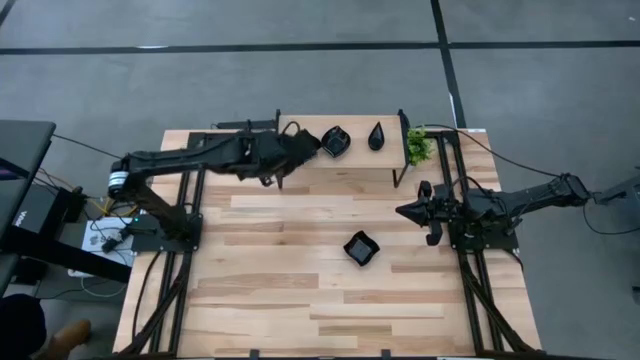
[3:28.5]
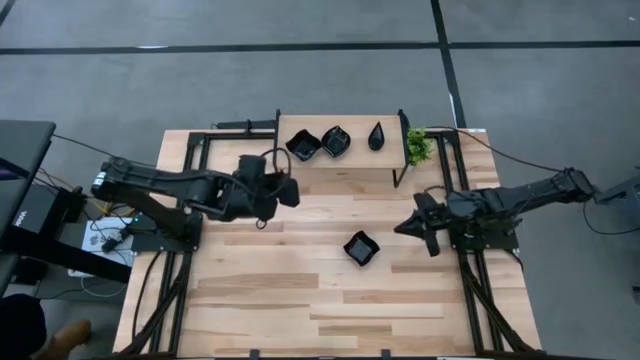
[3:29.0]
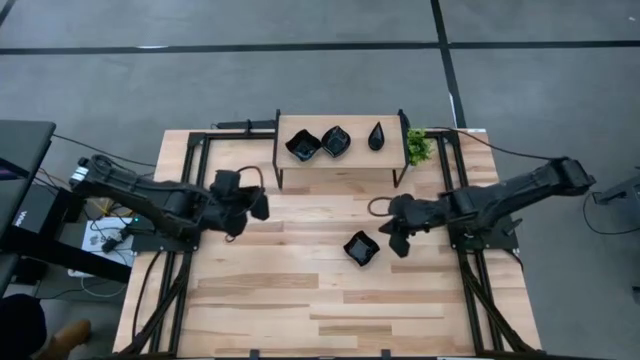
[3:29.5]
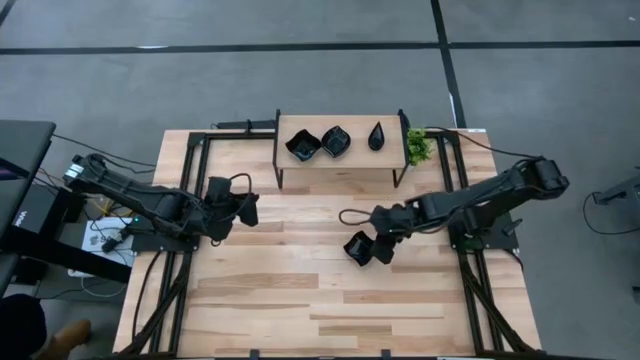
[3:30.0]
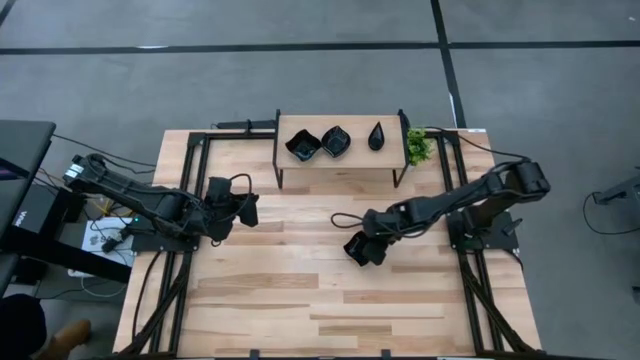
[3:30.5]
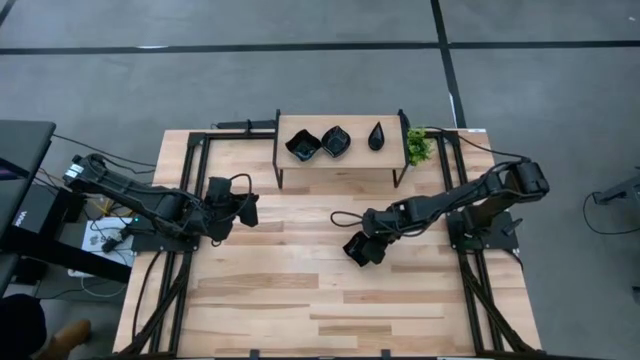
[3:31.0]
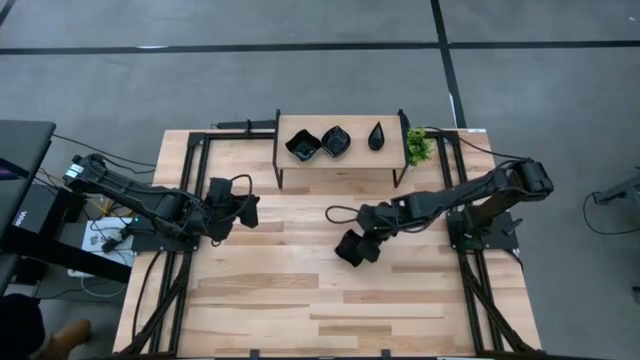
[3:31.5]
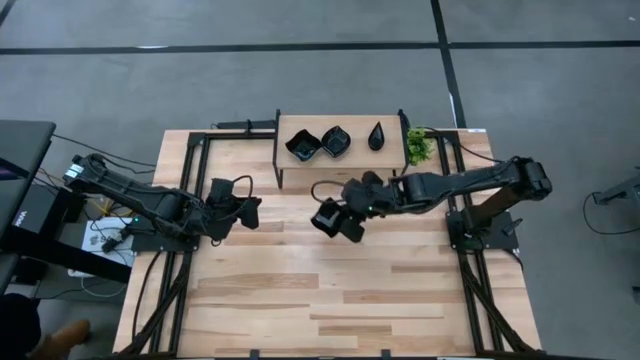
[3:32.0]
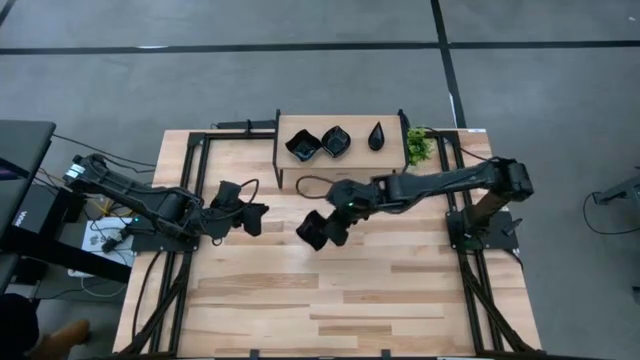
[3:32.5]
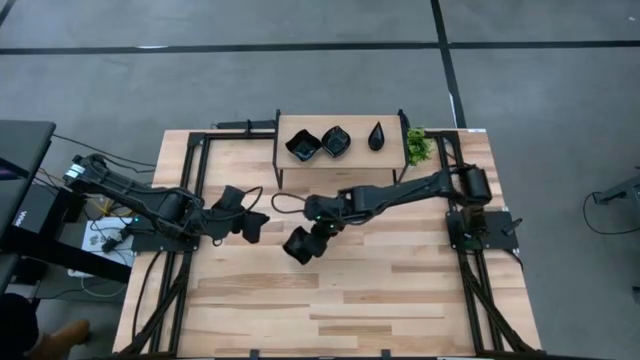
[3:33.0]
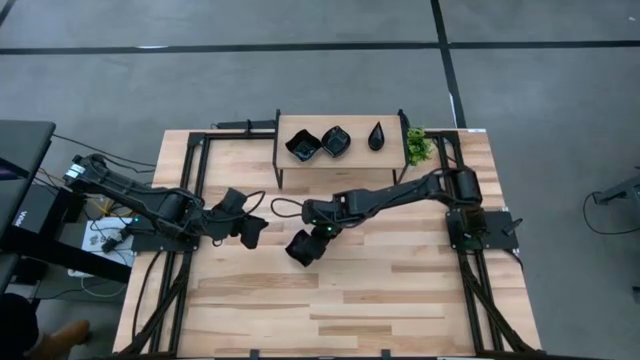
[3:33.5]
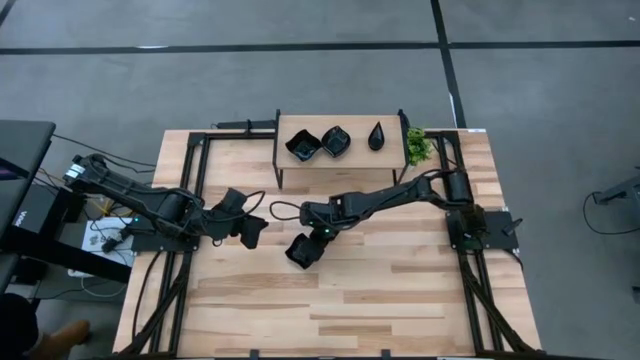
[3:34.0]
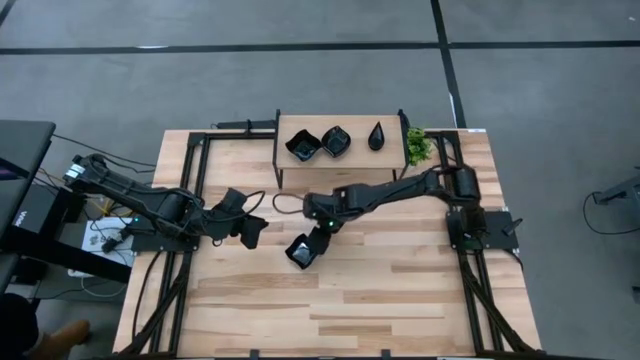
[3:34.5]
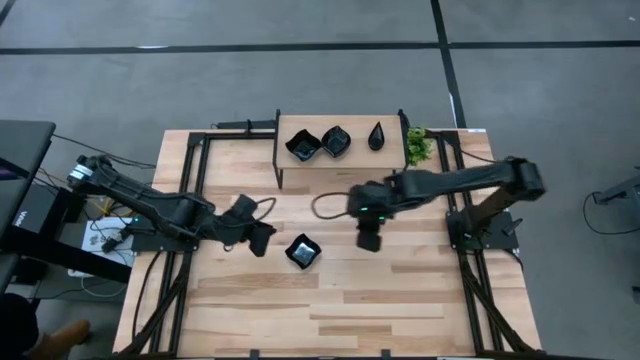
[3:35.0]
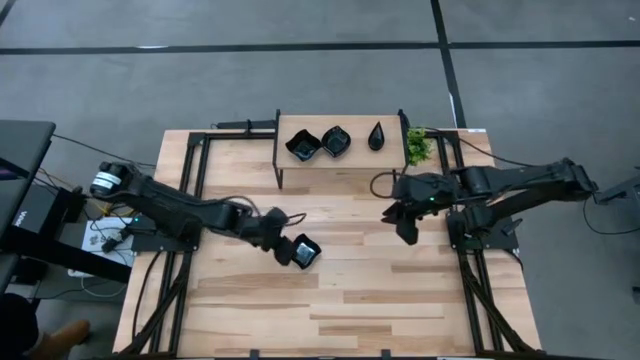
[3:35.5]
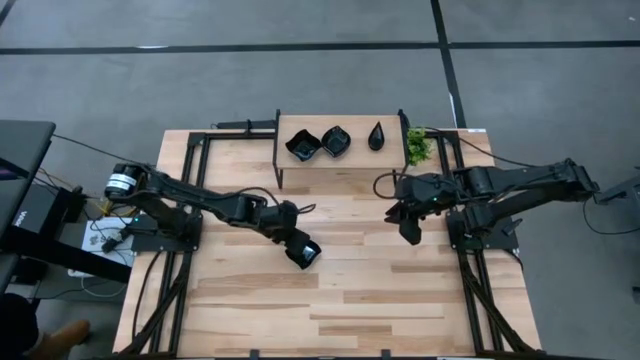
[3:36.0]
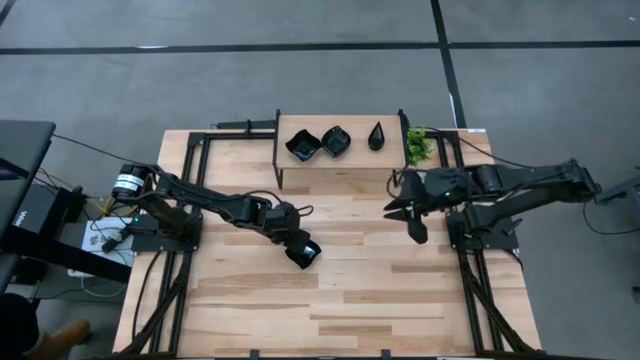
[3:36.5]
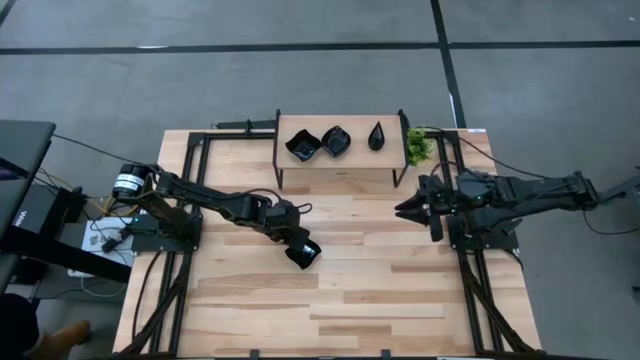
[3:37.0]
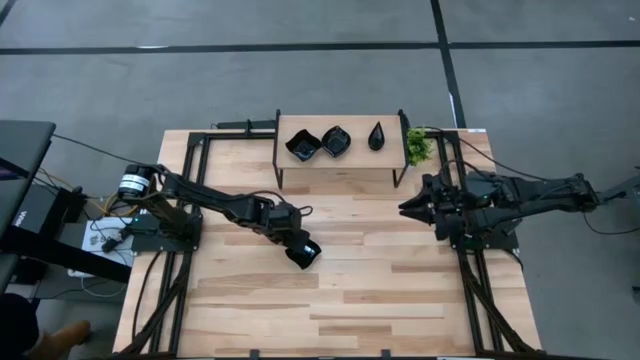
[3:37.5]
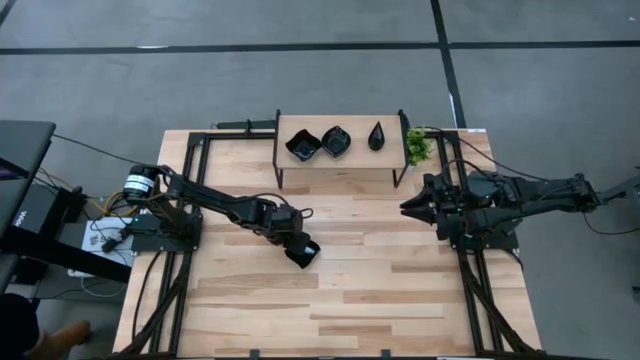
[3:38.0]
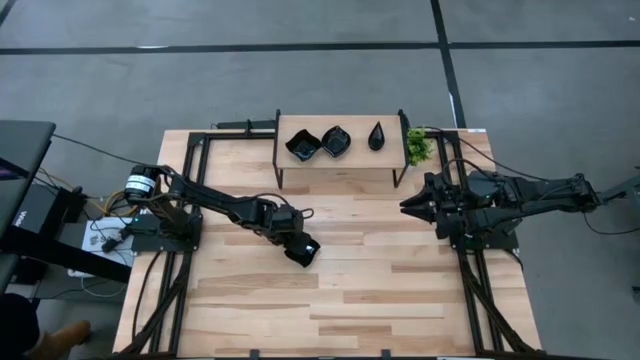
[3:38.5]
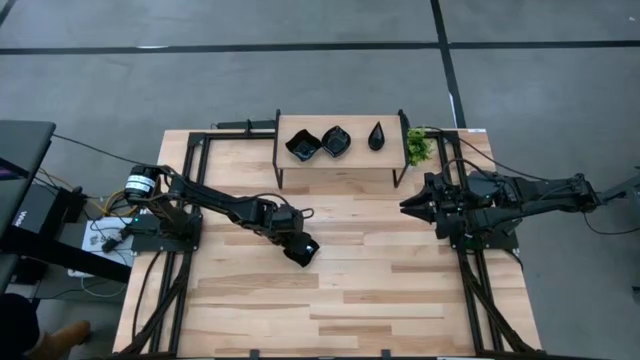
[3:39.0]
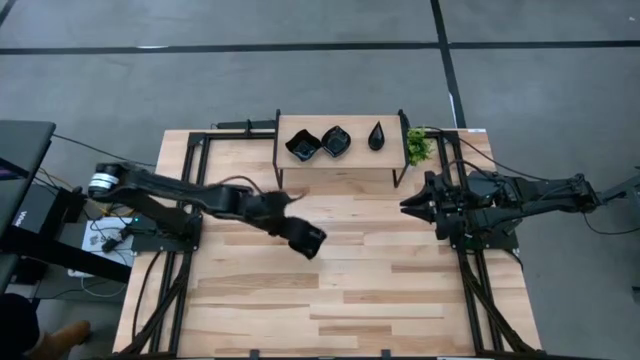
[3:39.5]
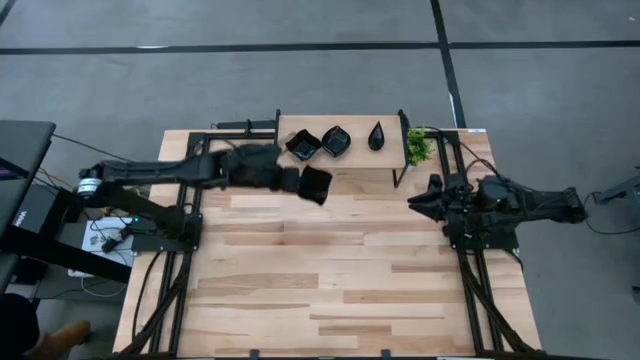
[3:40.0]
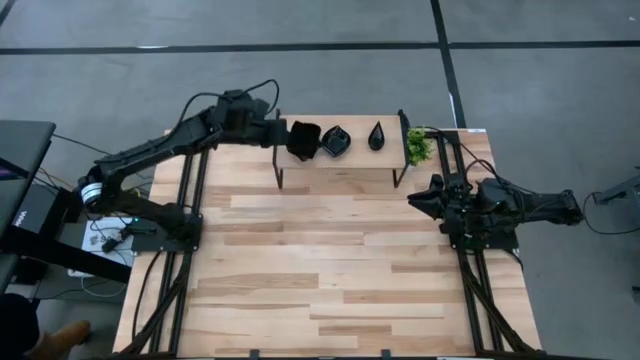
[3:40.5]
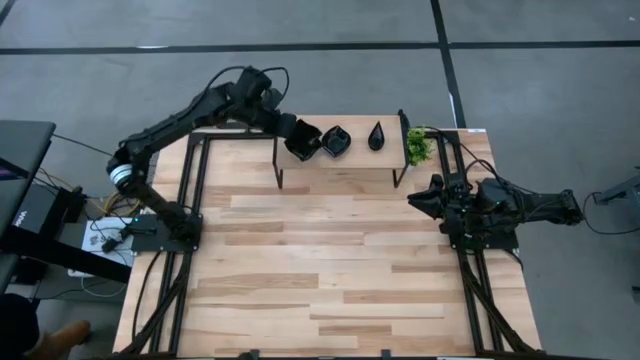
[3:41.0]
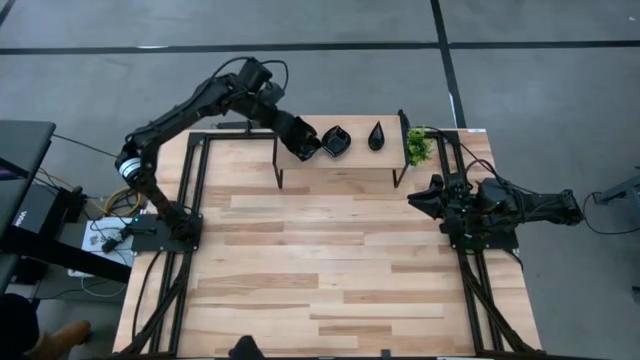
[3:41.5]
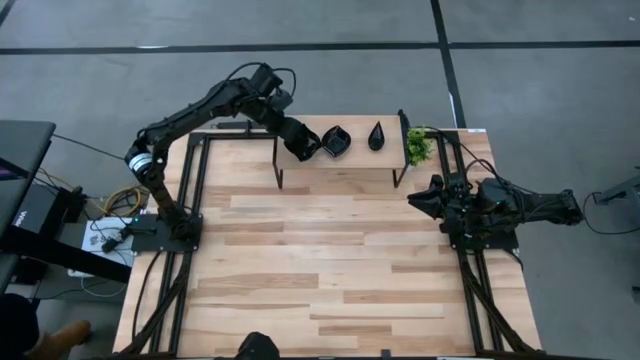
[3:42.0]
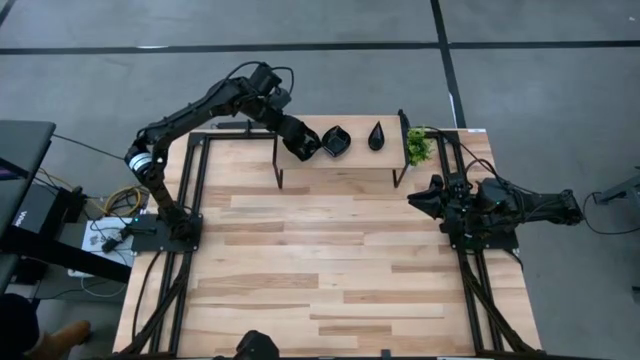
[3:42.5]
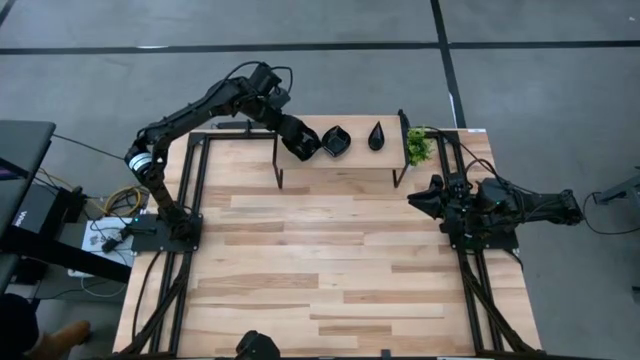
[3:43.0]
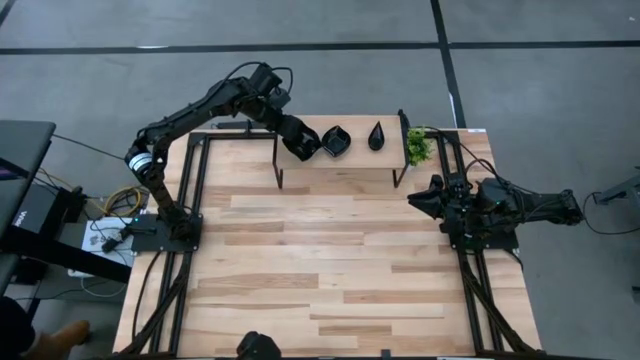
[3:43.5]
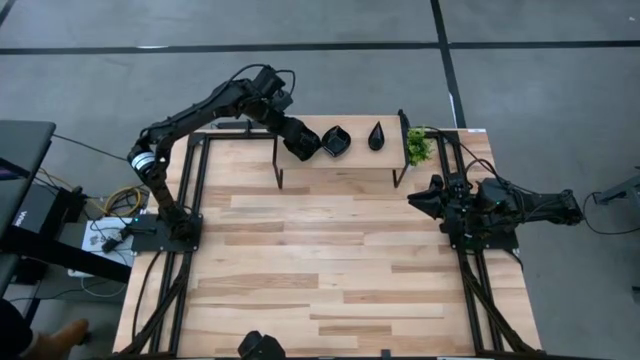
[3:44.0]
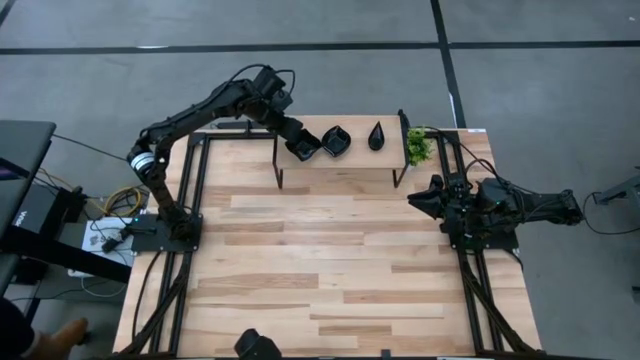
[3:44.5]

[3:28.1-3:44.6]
Task: Pick & Place Mini shaped plates
Stack the distorted square plate on top of the other distorted square plates on the shelf

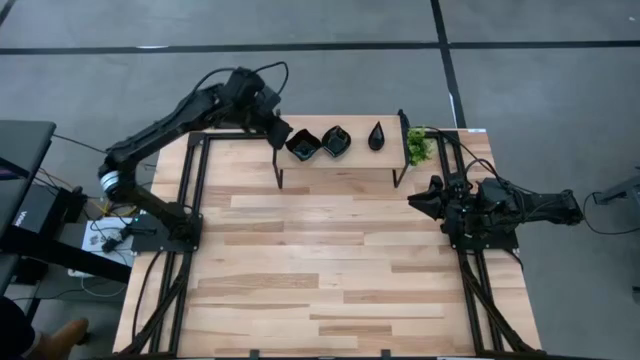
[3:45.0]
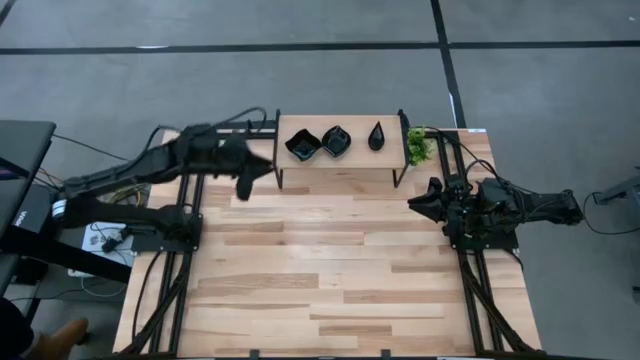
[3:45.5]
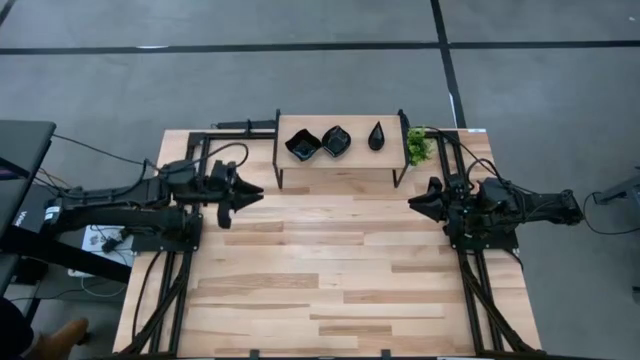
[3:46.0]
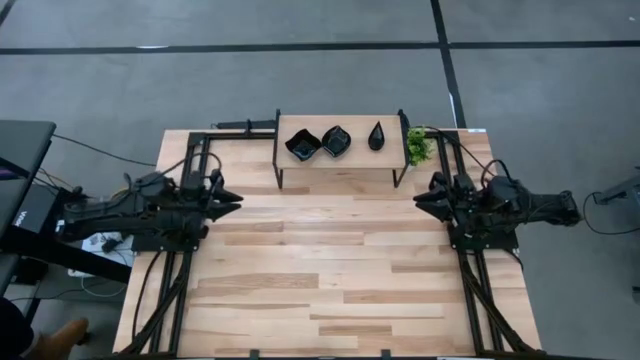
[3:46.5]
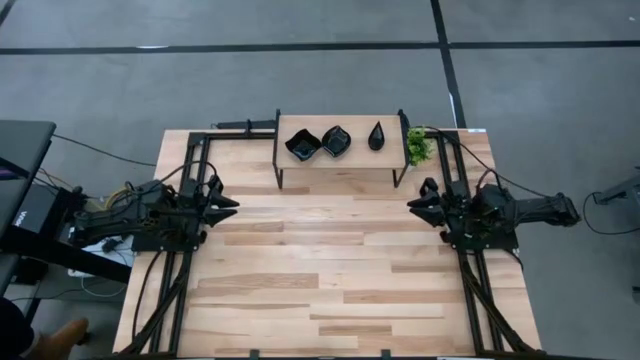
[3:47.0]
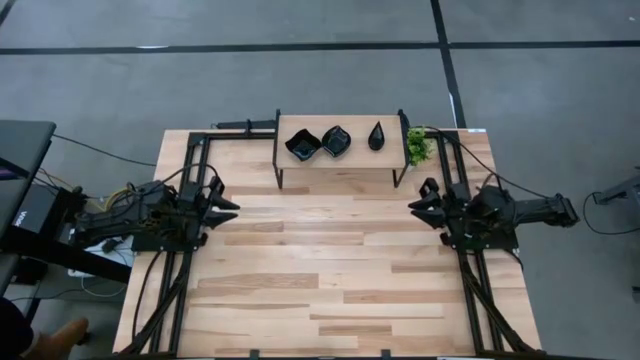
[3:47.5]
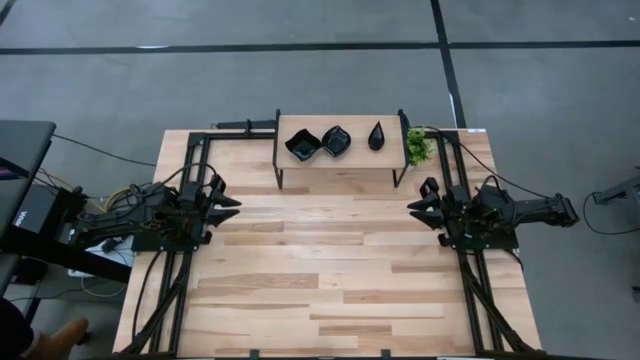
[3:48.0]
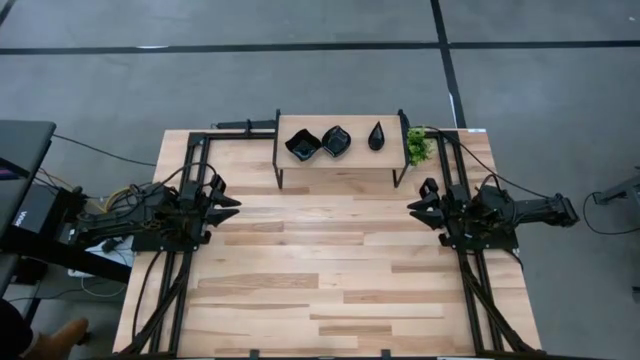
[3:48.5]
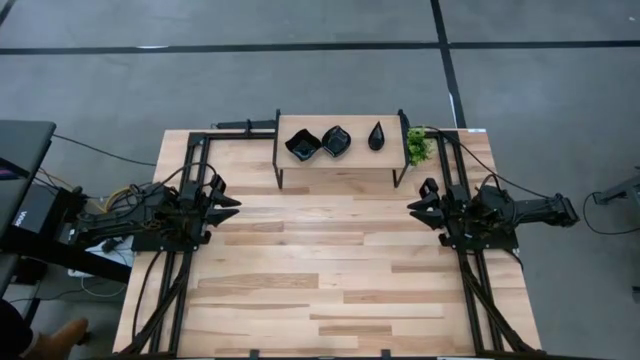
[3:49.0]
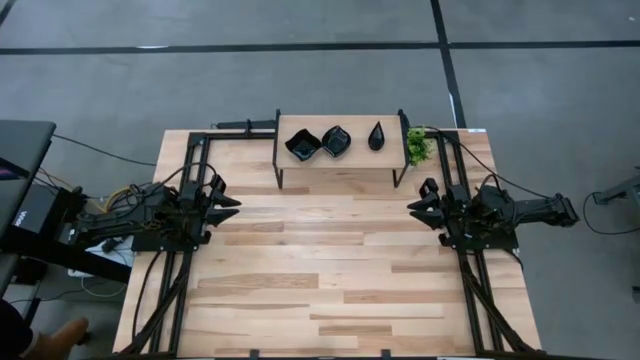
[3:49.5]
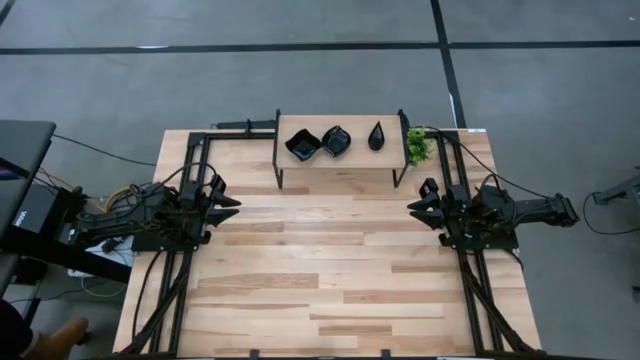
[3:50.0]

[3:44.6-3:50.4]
Return to Home Position
